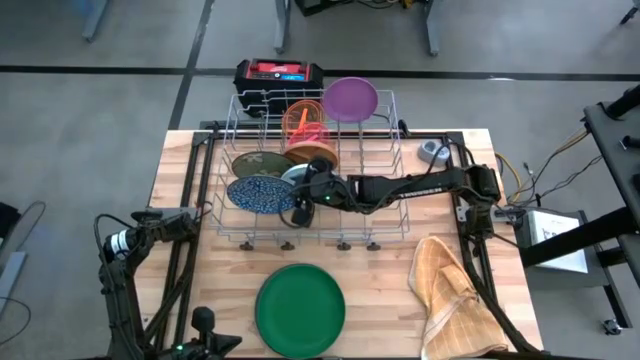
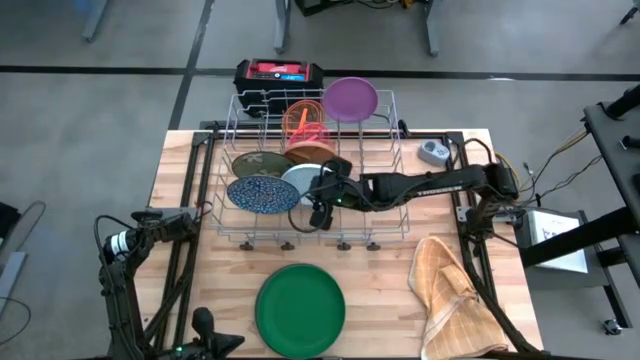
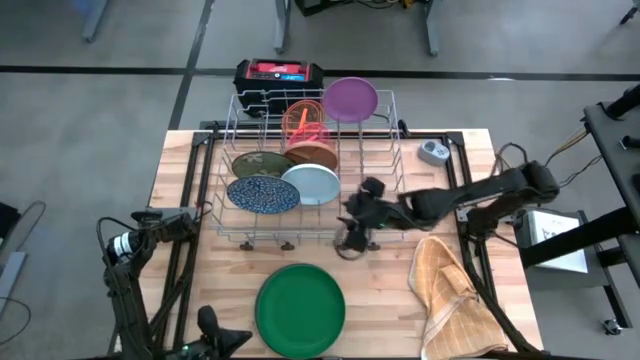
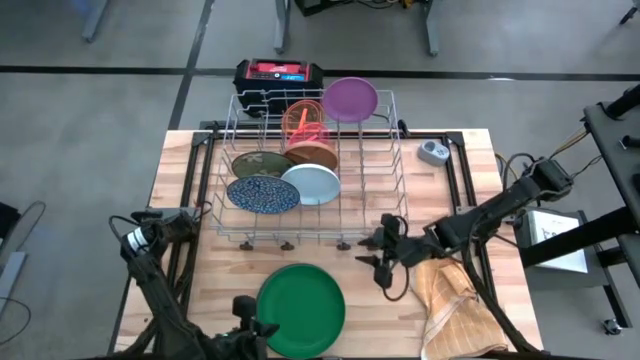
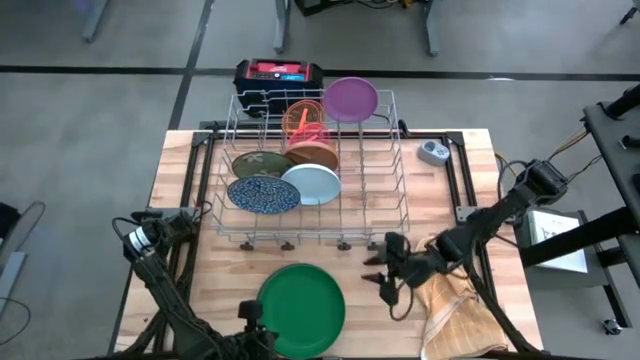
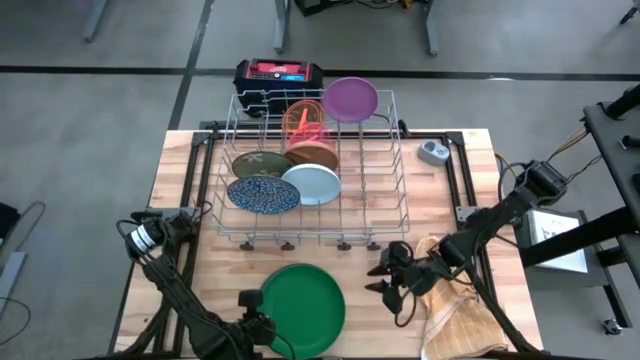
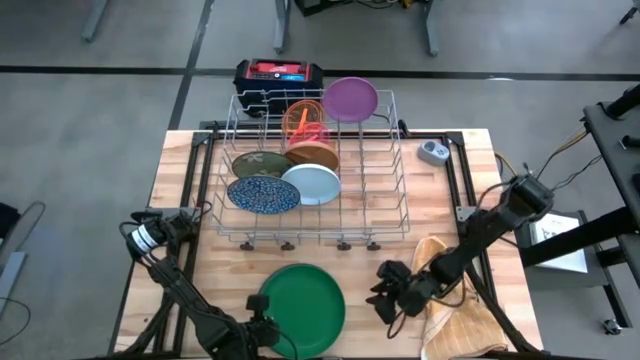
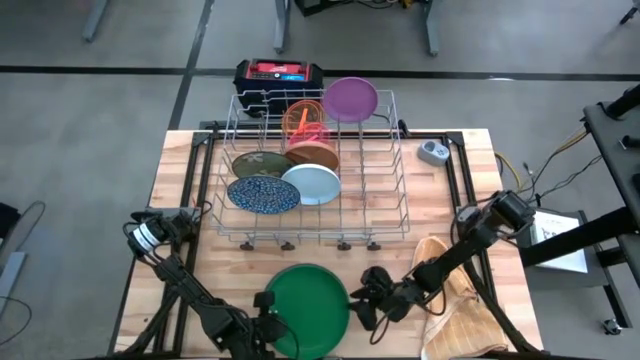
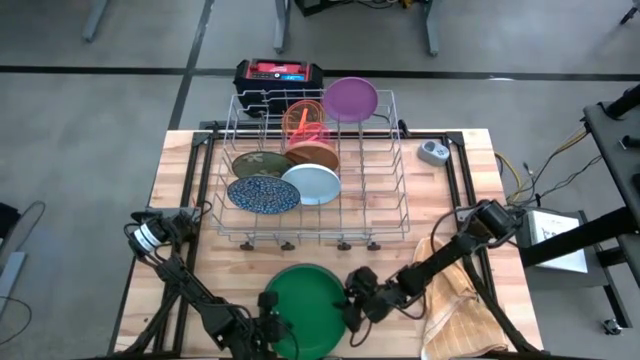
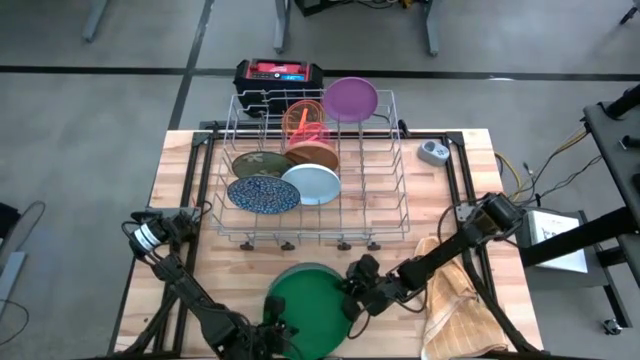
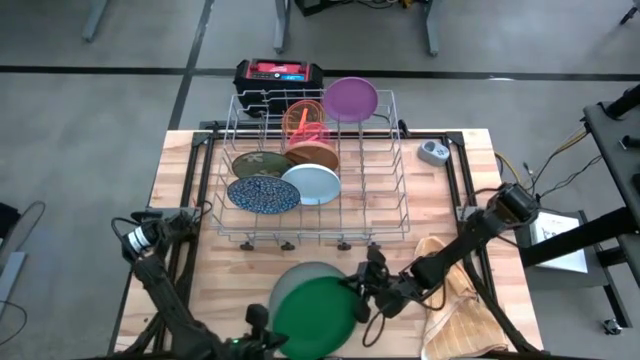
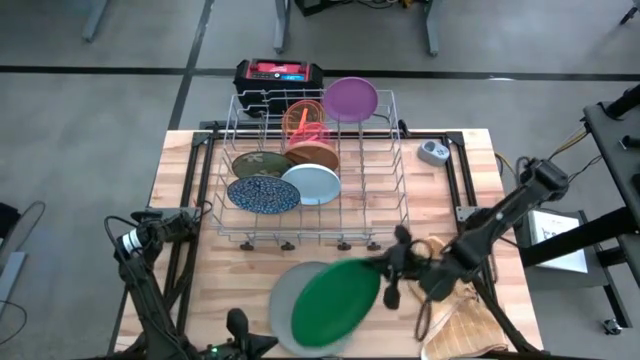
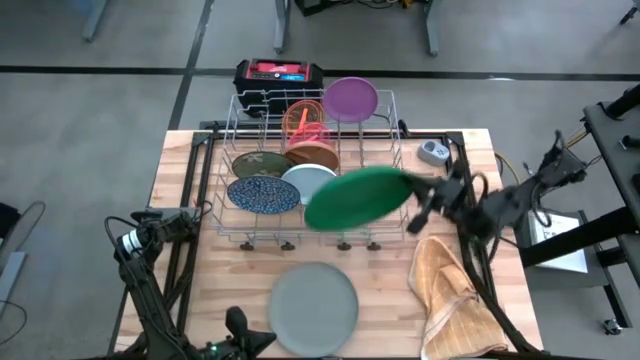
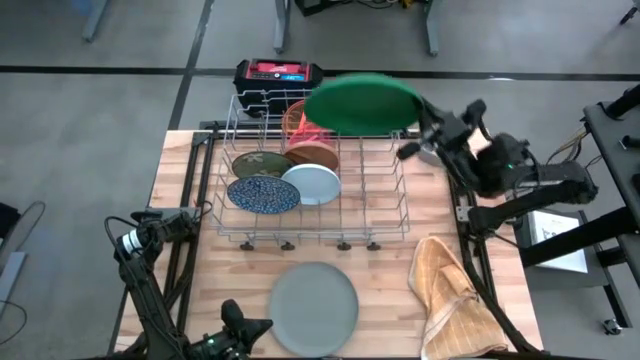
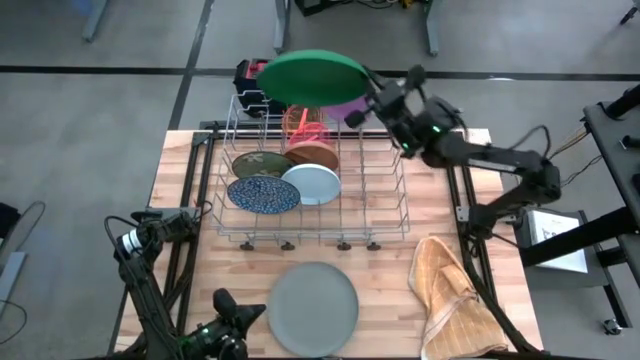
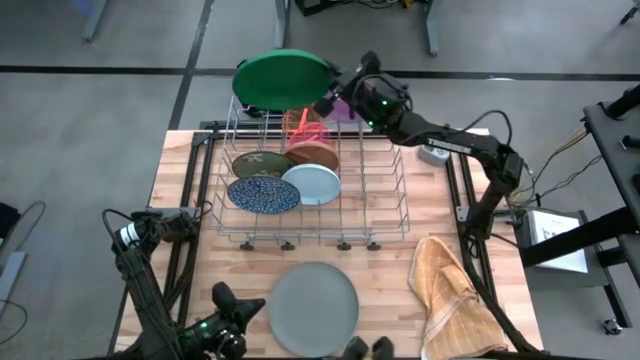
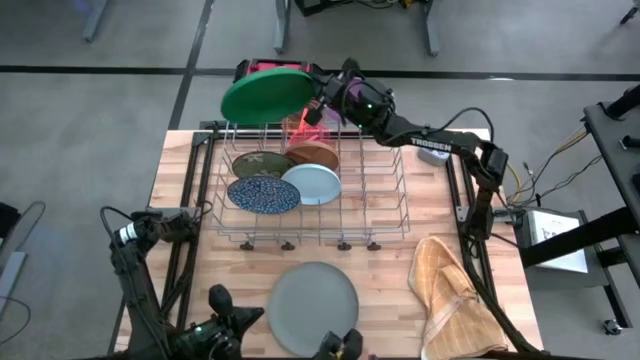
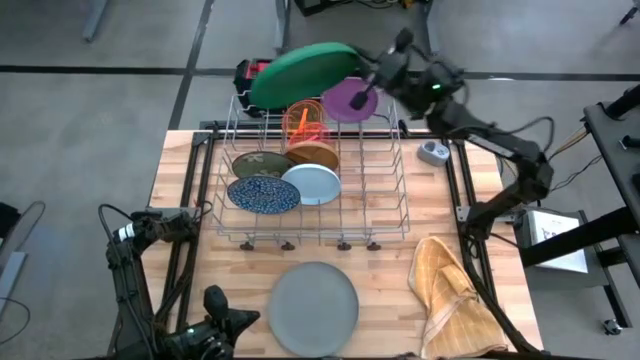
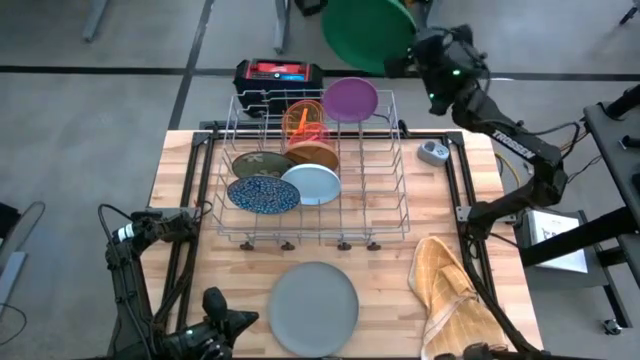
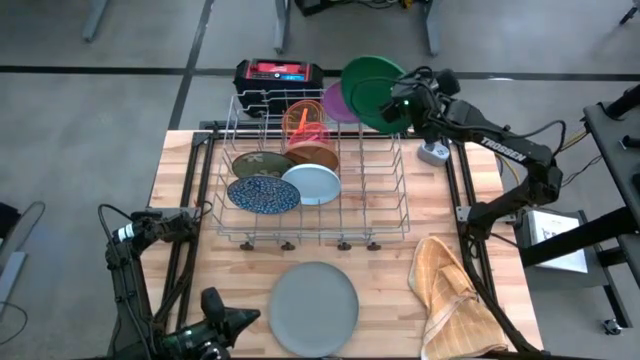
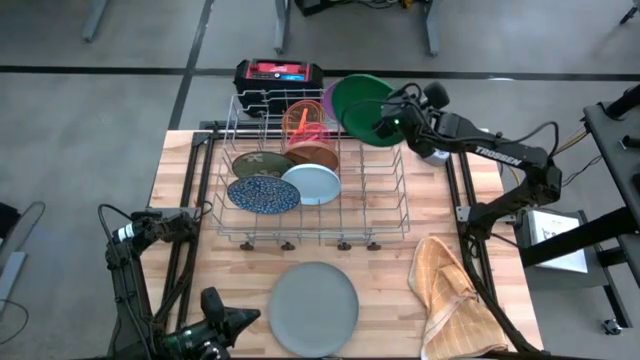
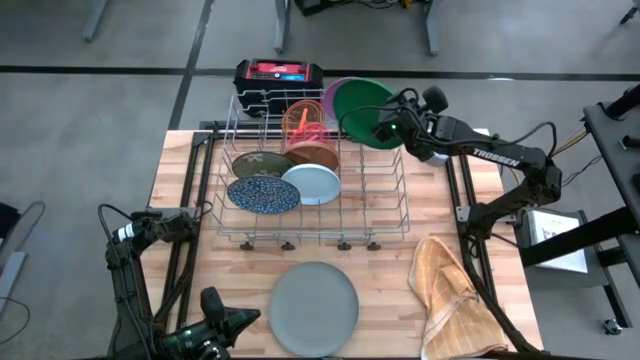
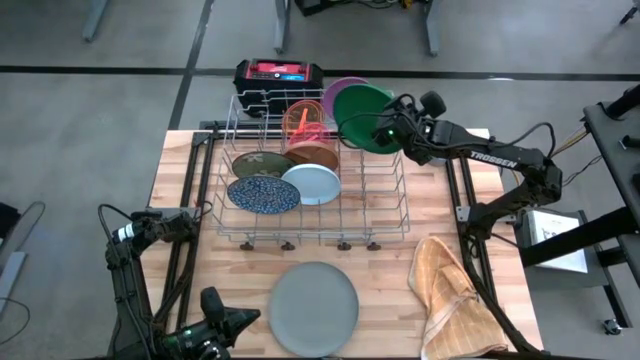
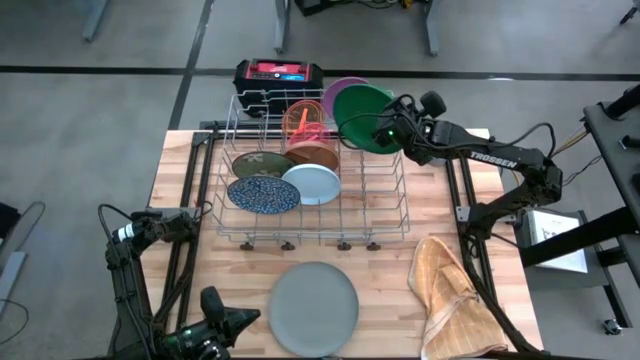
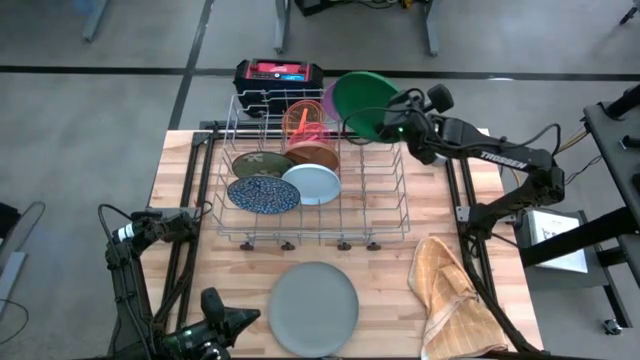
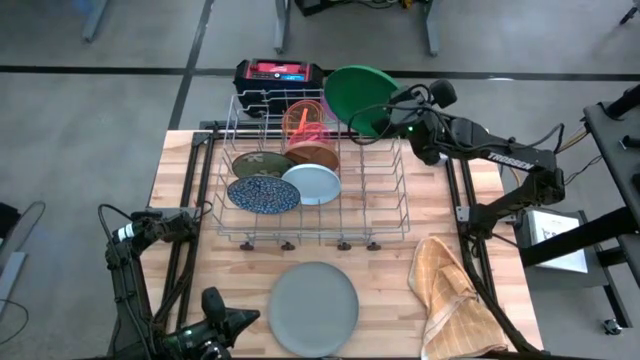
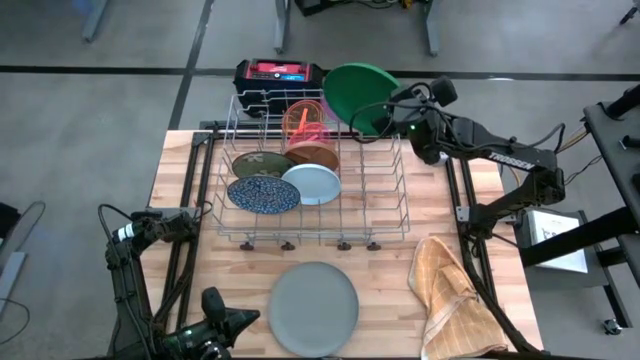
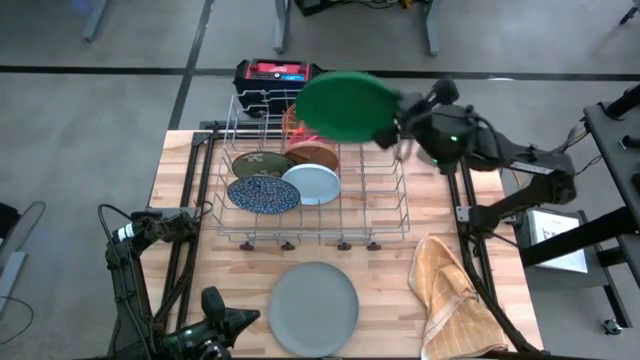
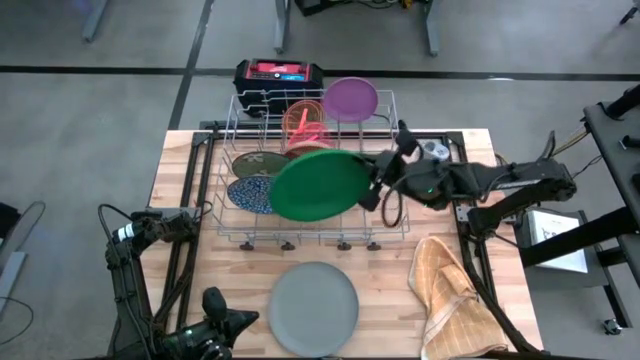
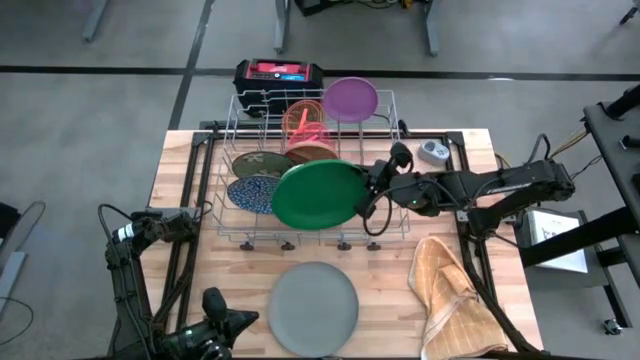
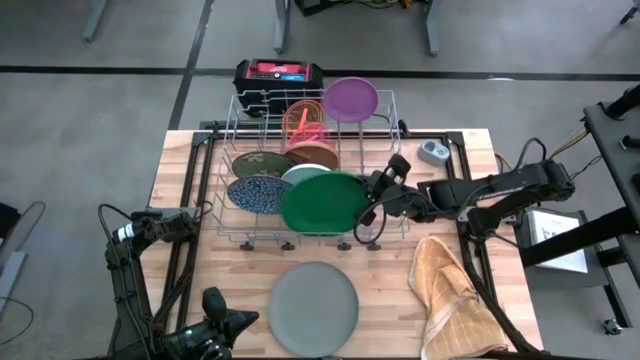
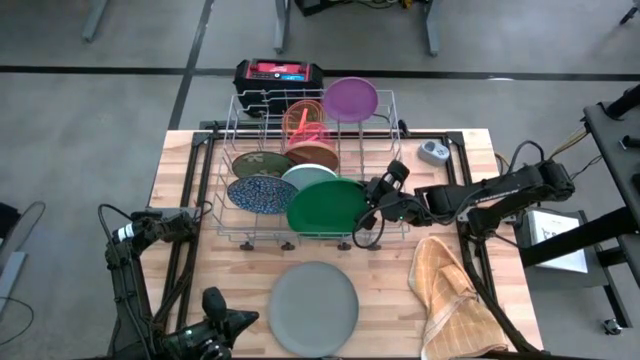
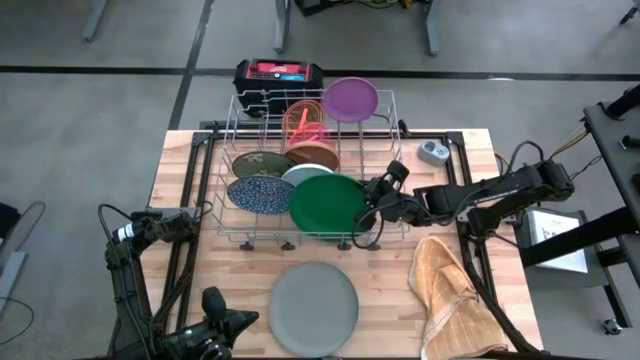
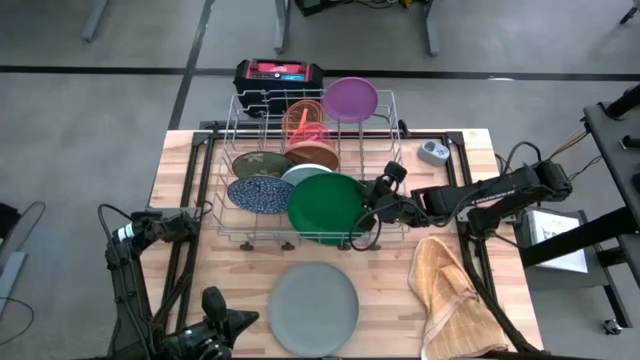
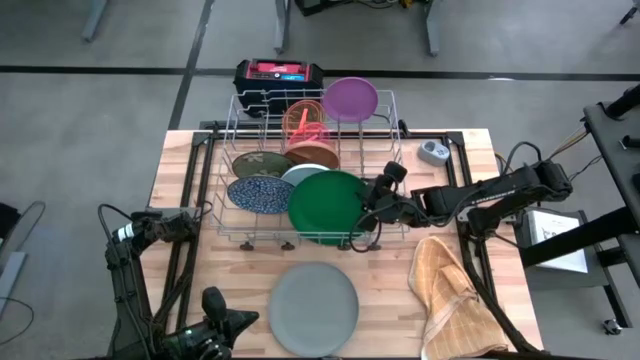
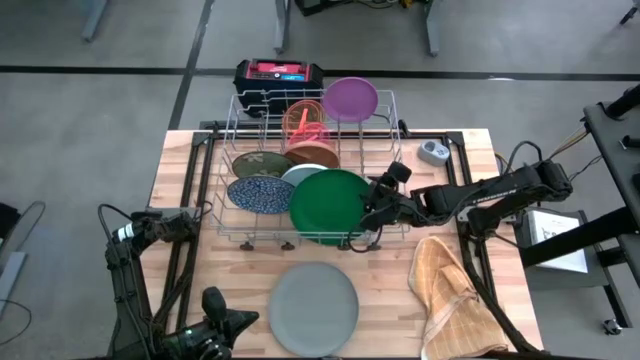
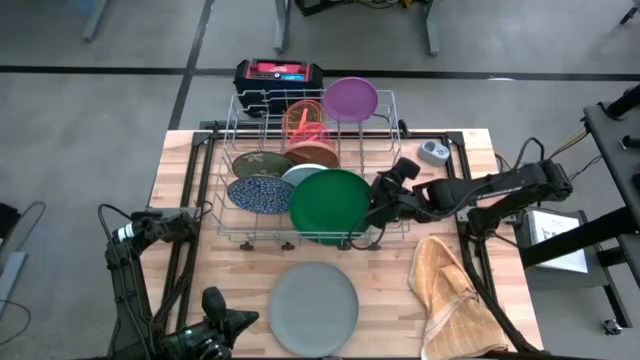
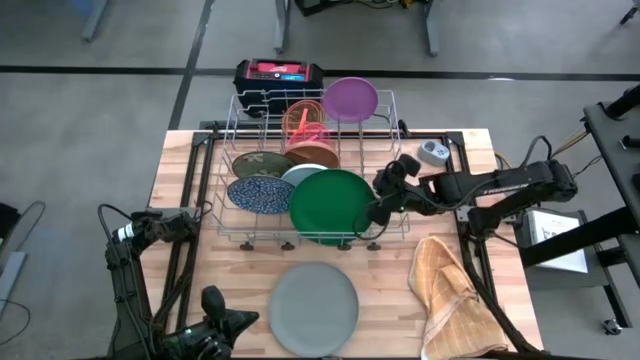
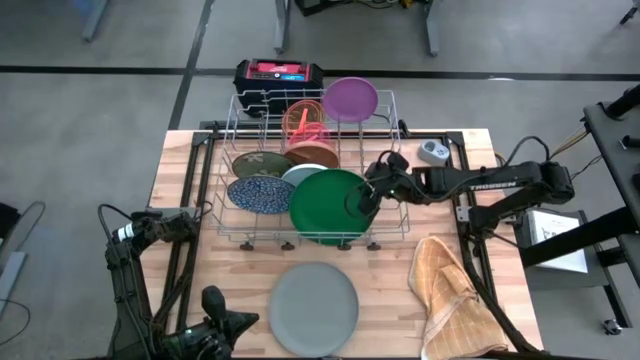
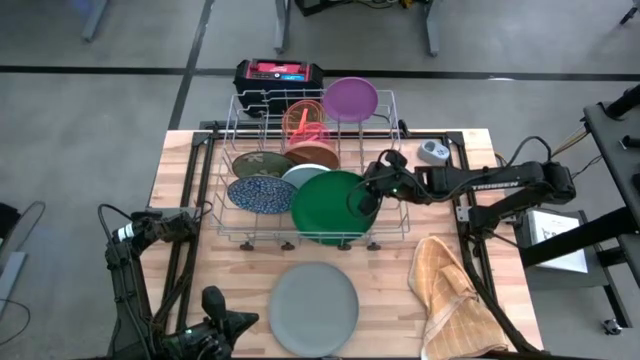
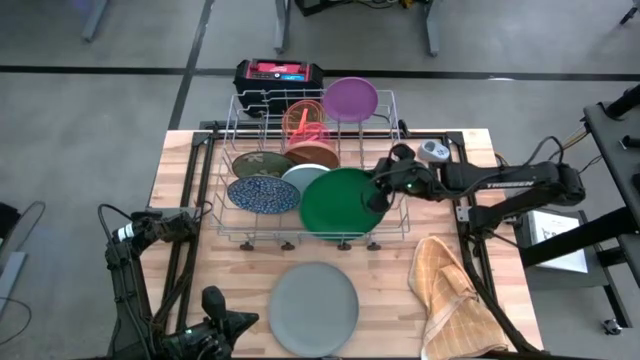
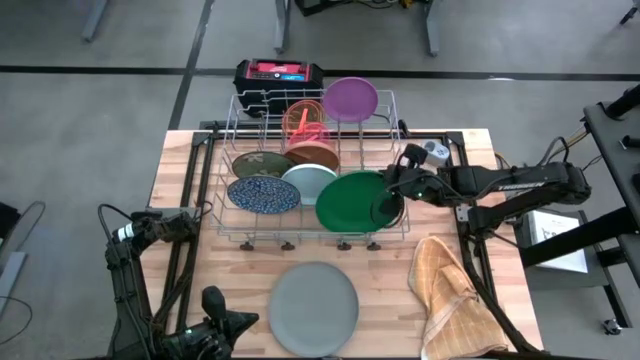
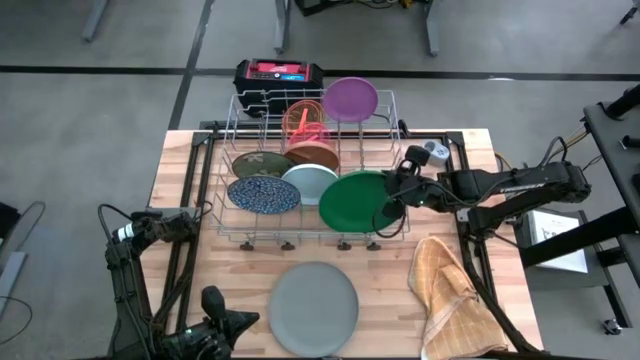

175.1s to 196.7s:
Task: Sort dishes
Put the green plate into the dish rack
